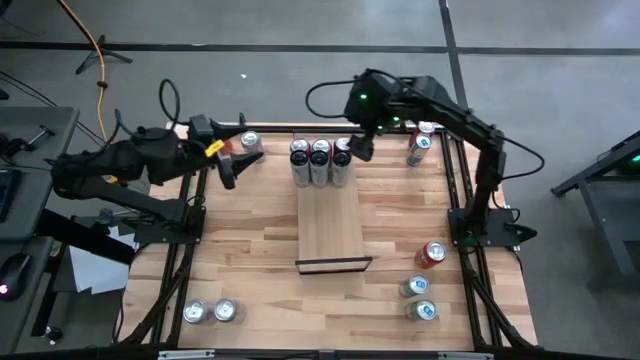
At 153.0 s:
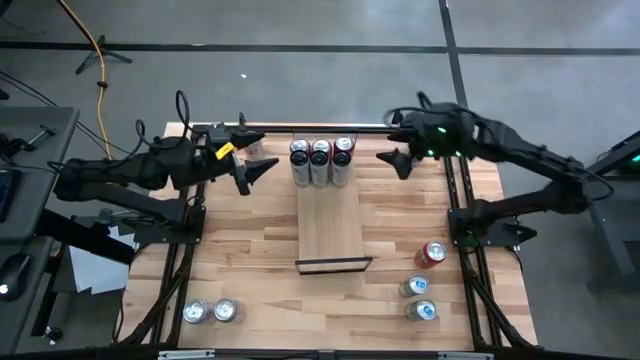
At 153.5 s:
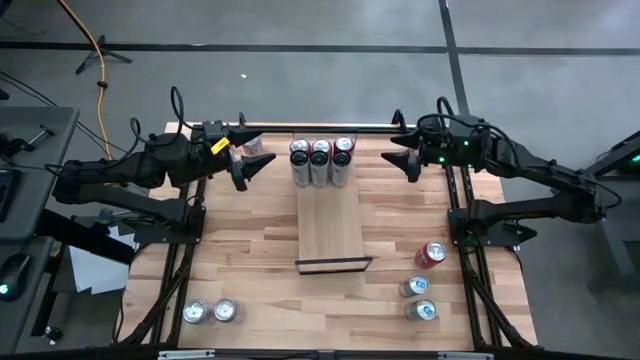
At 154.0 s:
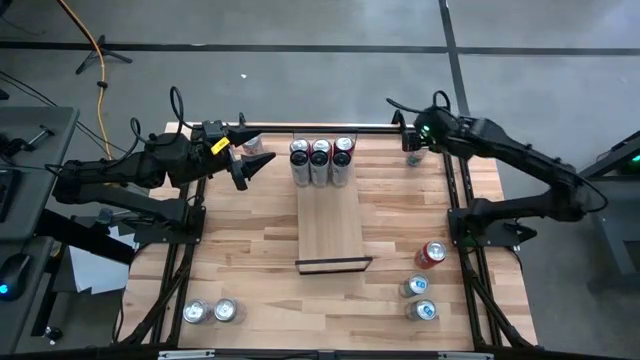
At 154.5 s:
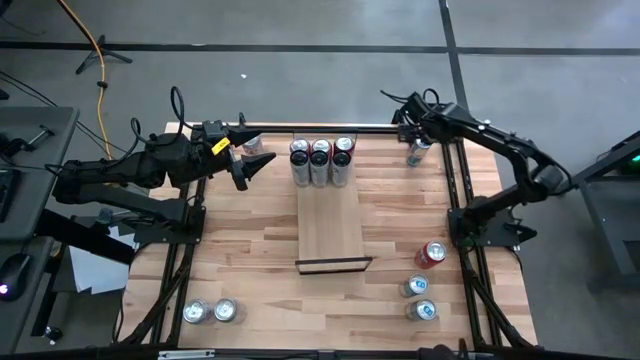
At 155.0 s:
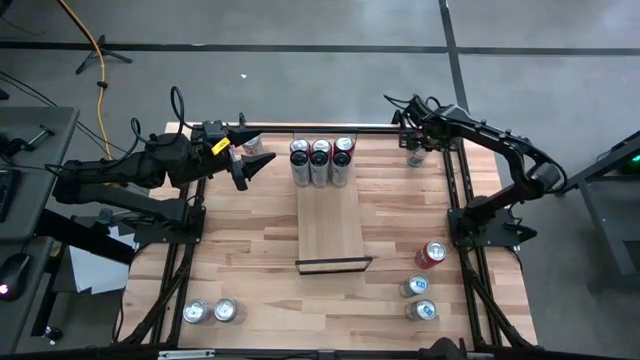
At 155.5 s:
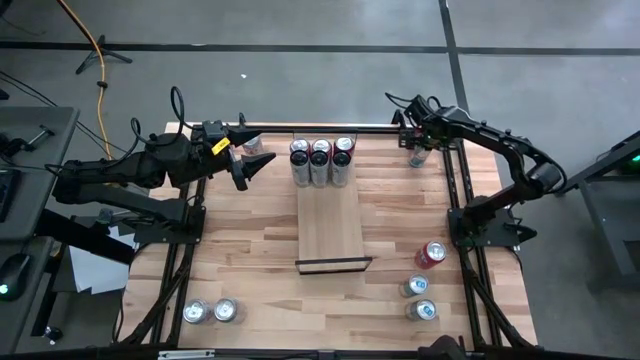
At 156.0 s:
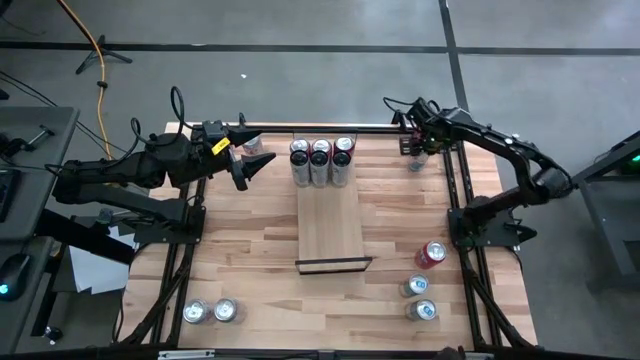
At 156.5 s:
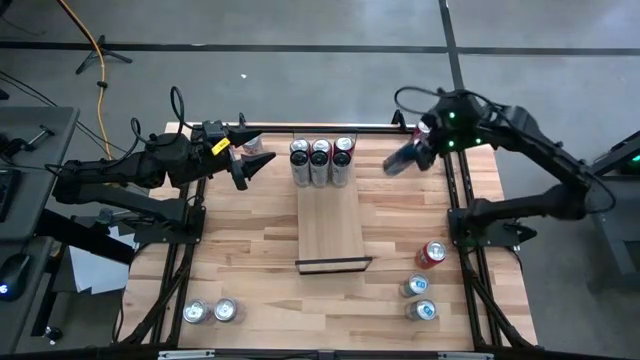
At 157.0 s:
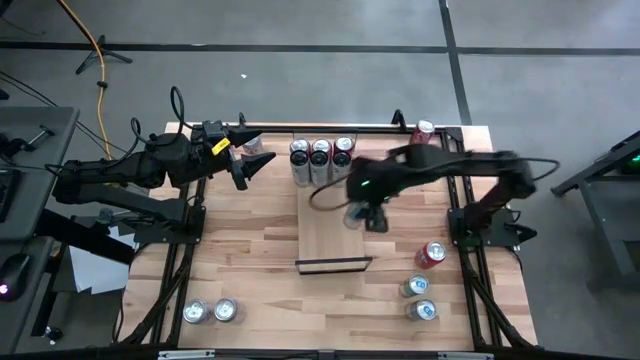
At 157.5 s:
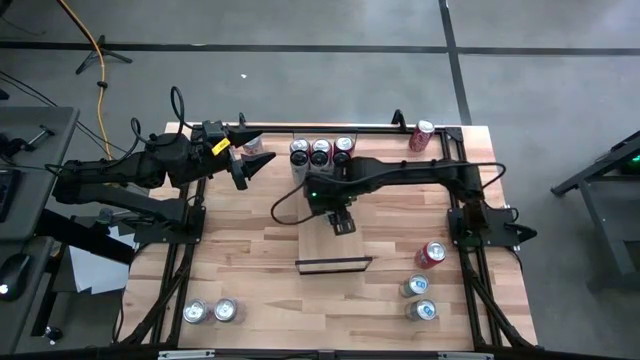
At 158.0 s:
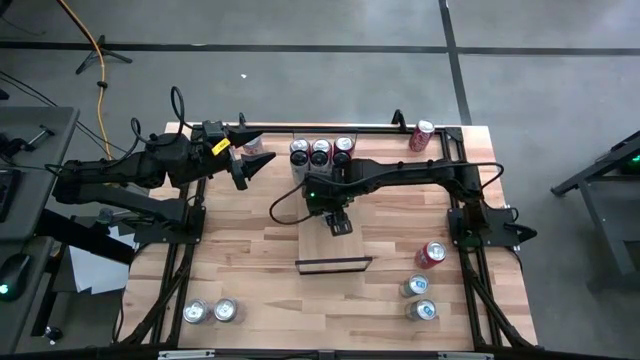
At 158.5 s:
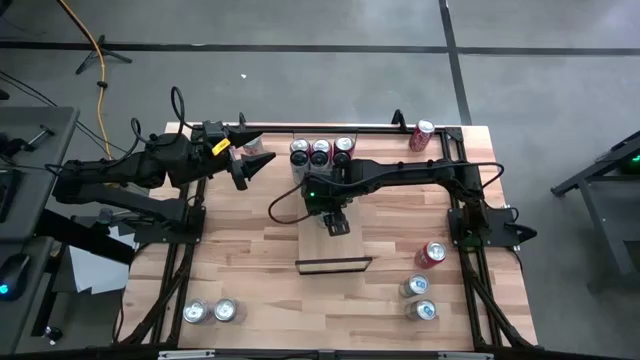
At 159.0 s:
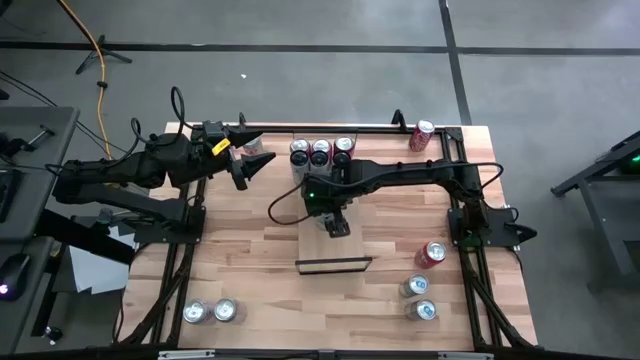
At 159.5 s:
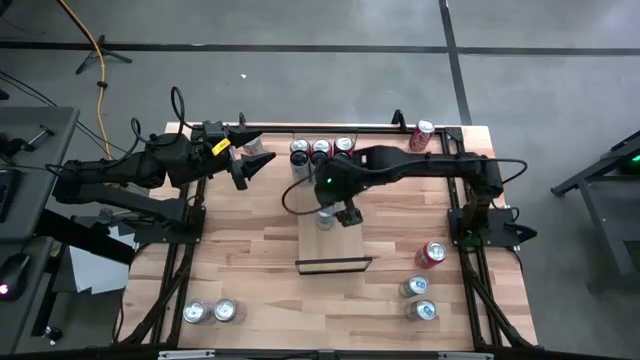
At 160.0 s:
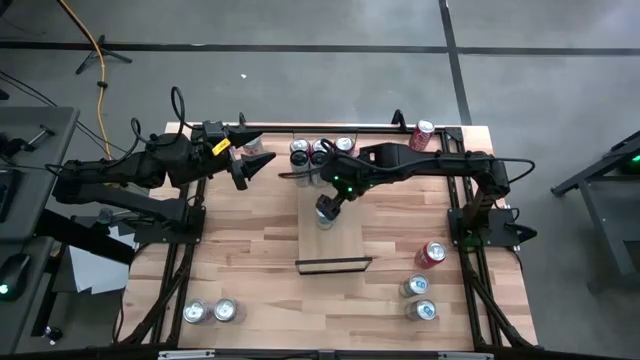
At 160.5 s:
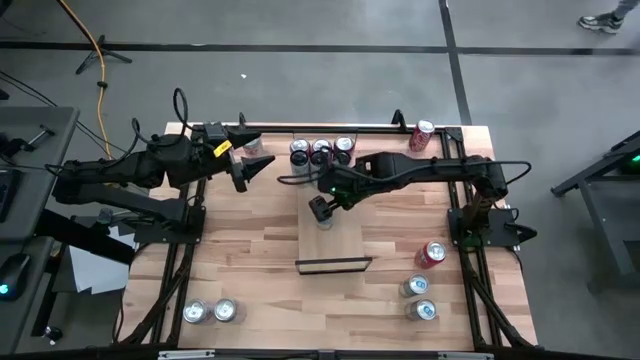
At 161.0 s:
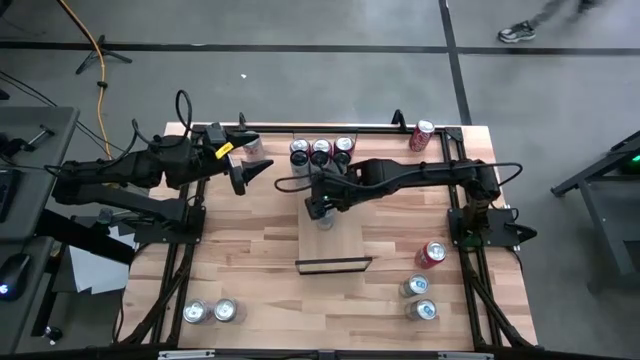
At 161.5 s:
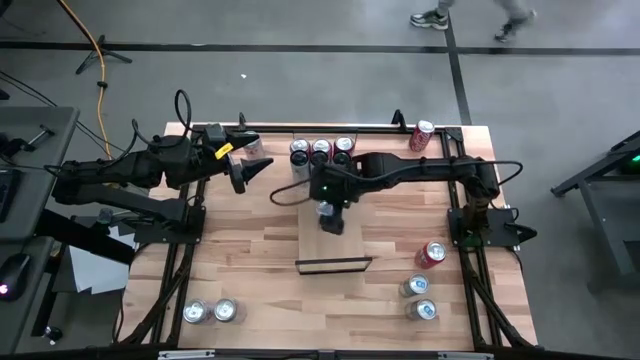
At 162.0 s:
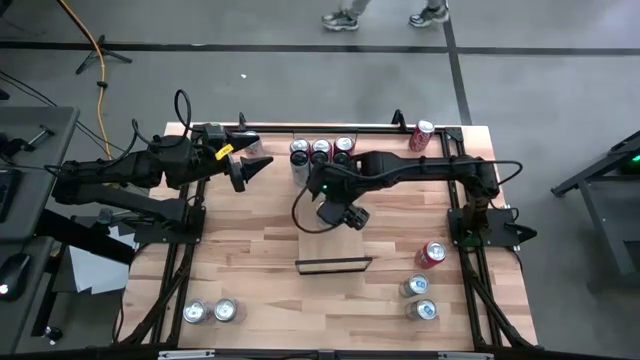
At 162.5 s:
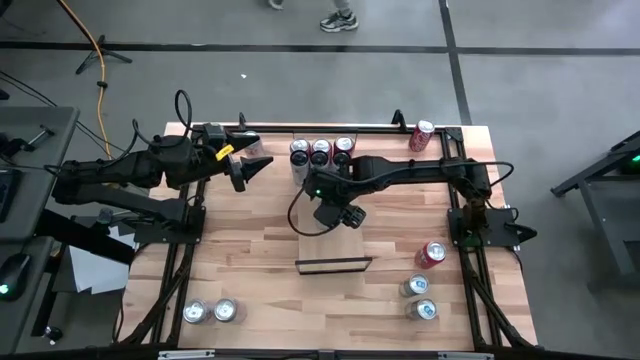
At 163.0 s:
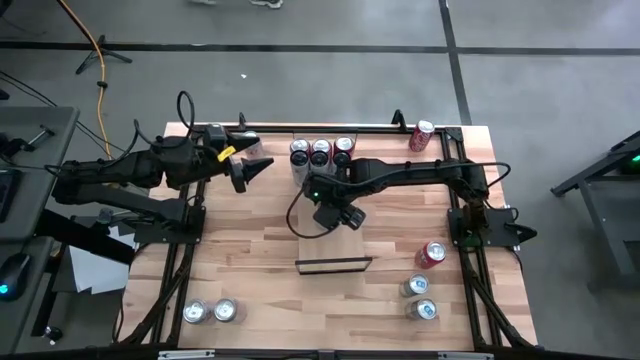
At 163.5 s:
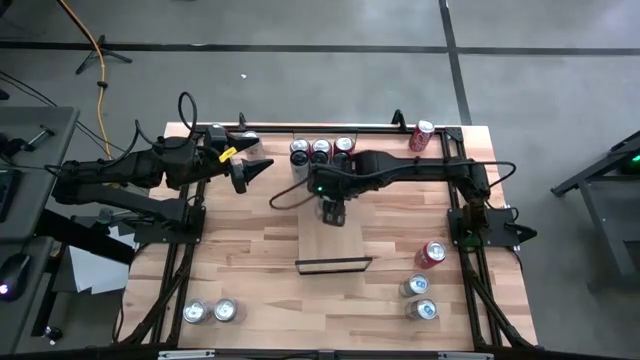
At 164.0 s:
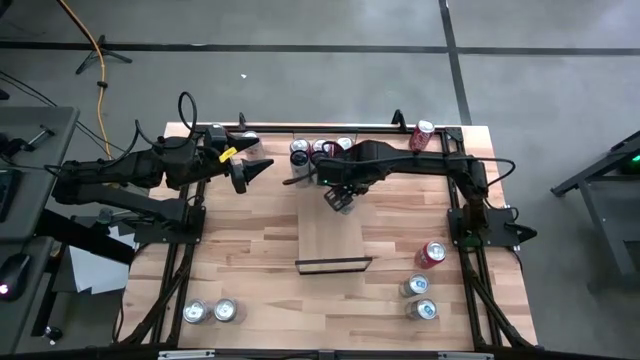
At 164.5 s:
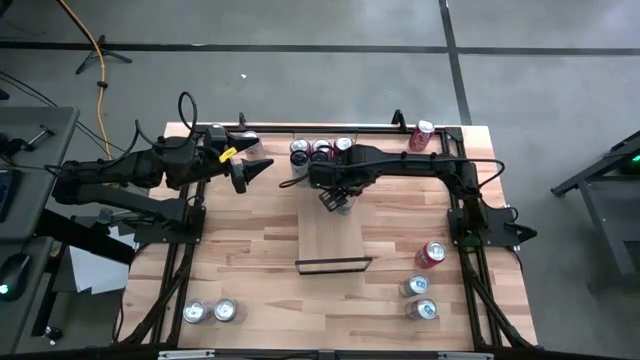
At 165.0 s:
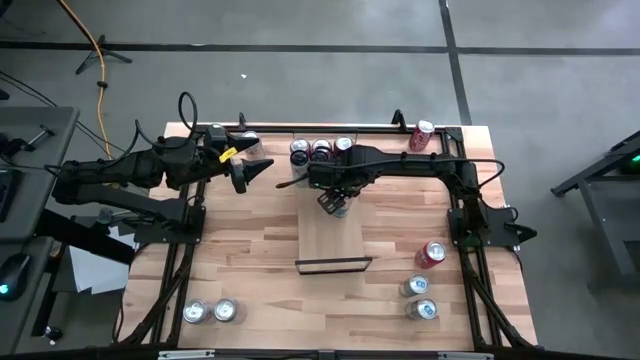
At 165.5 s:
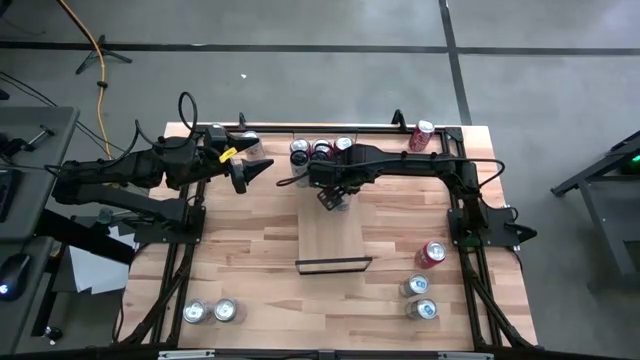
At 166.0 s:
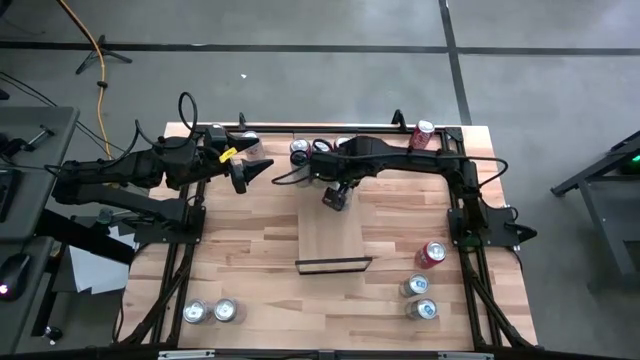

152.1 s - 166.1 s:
Task: Place canned beverage on shelf
Put the blue soda can on the shelf

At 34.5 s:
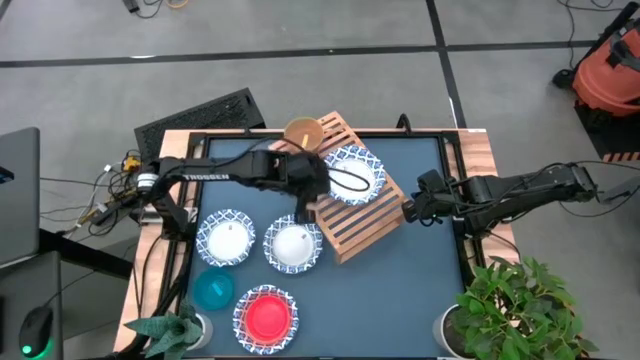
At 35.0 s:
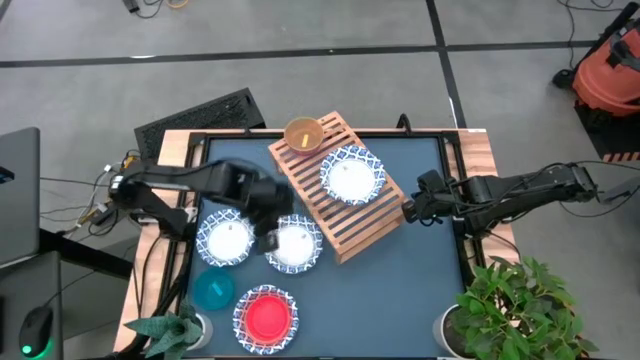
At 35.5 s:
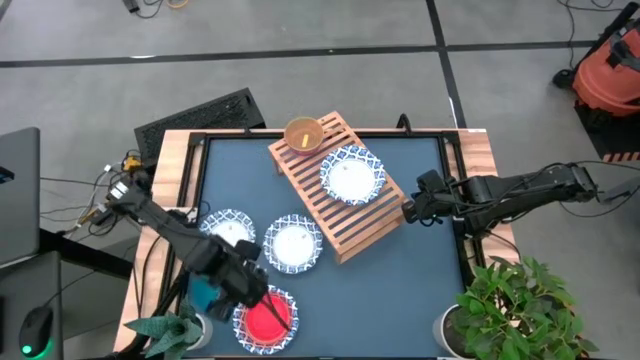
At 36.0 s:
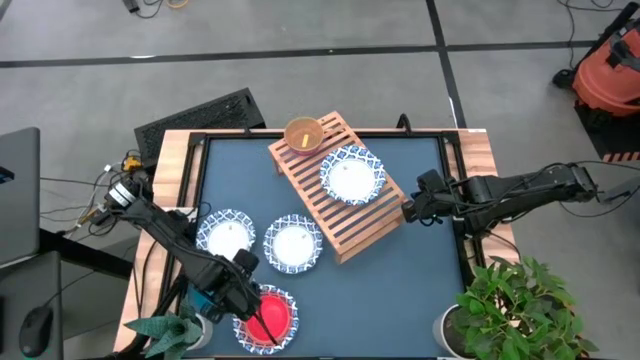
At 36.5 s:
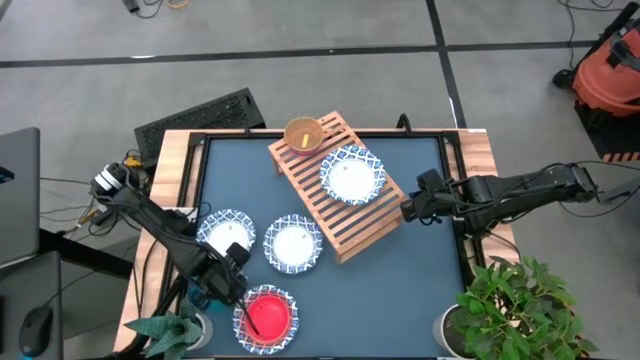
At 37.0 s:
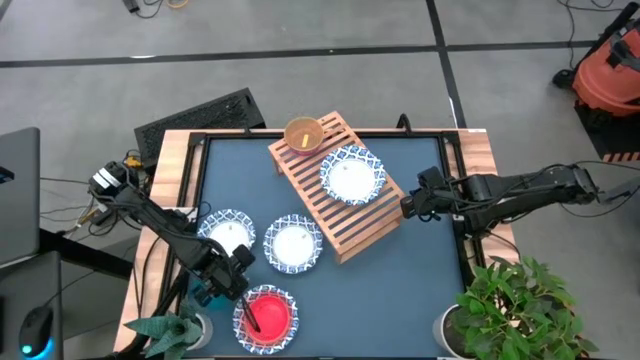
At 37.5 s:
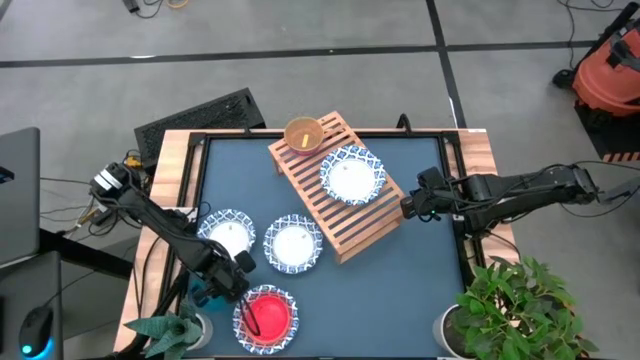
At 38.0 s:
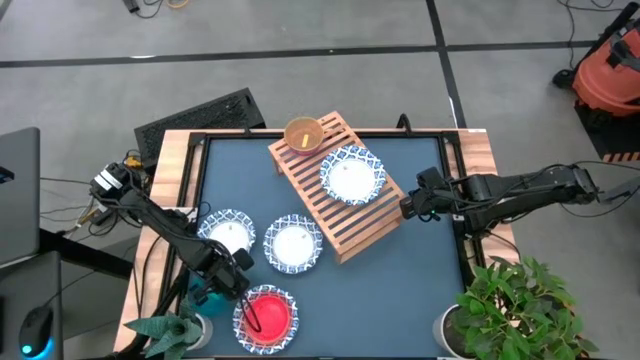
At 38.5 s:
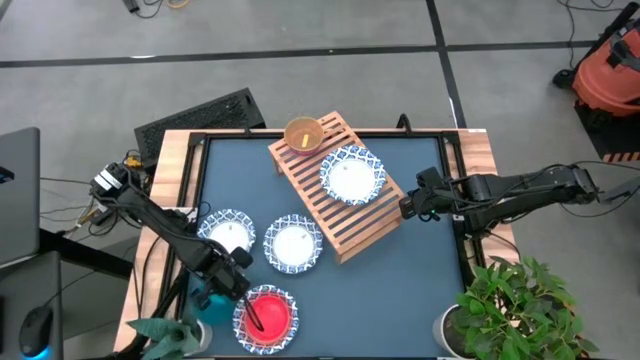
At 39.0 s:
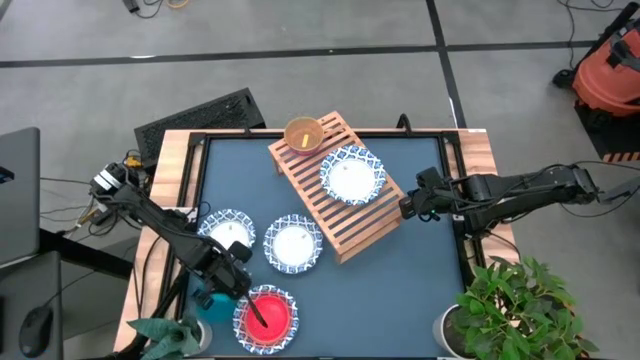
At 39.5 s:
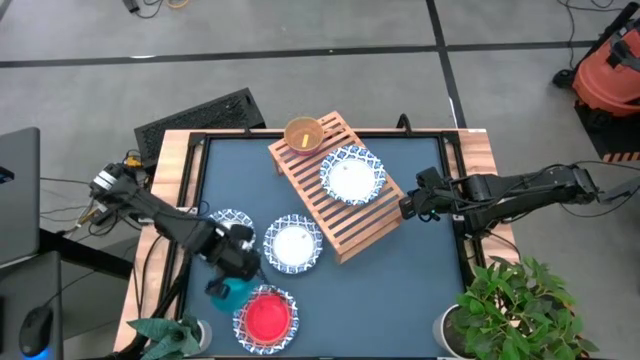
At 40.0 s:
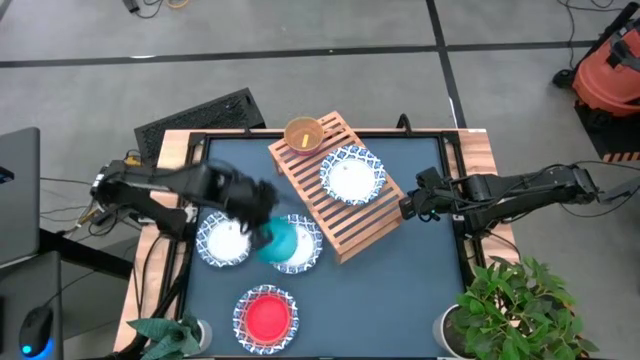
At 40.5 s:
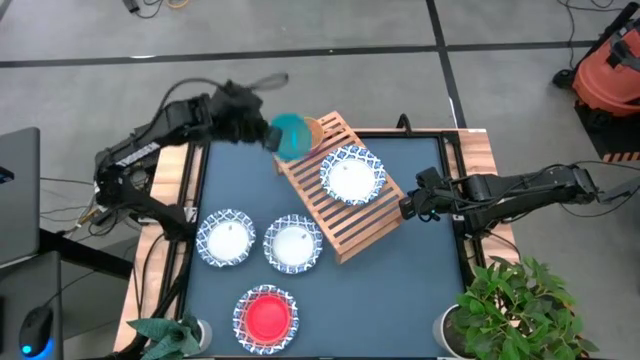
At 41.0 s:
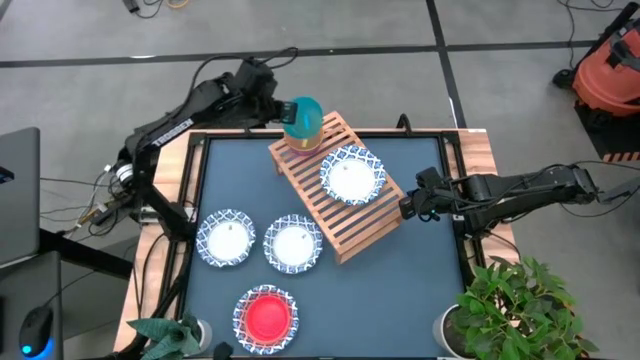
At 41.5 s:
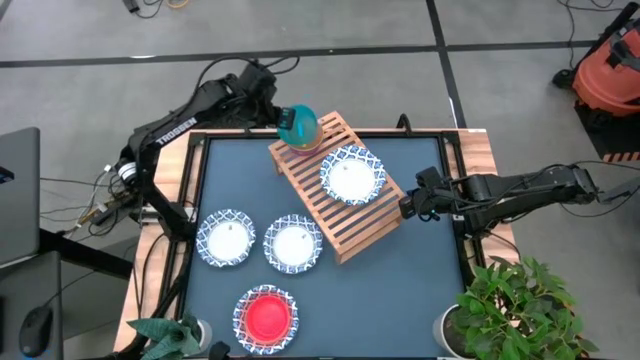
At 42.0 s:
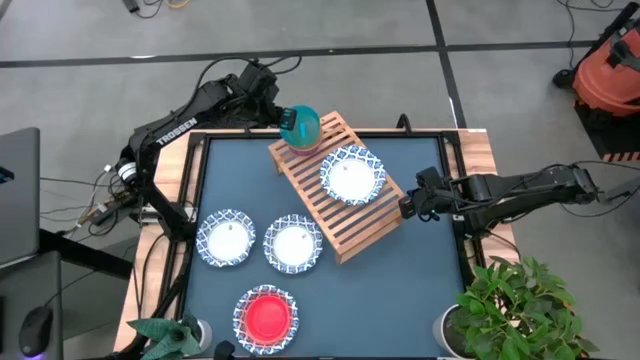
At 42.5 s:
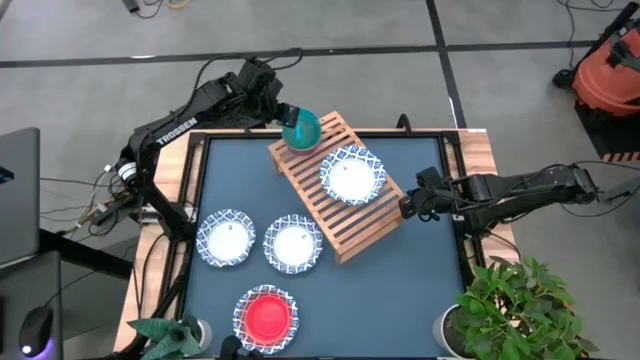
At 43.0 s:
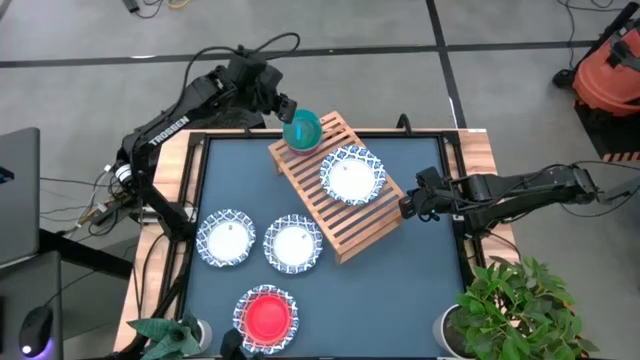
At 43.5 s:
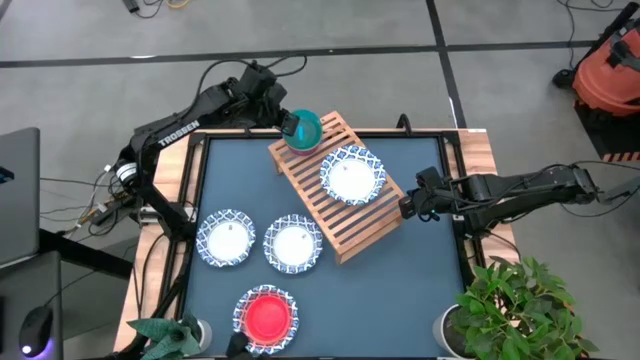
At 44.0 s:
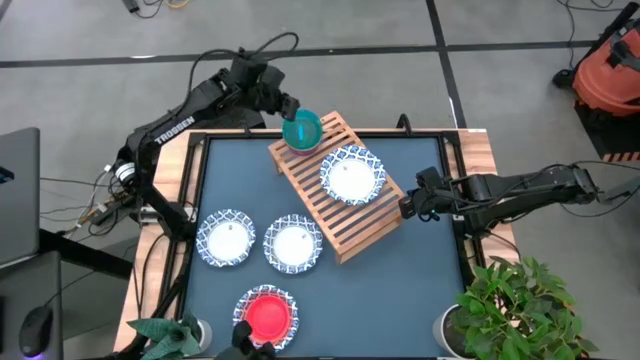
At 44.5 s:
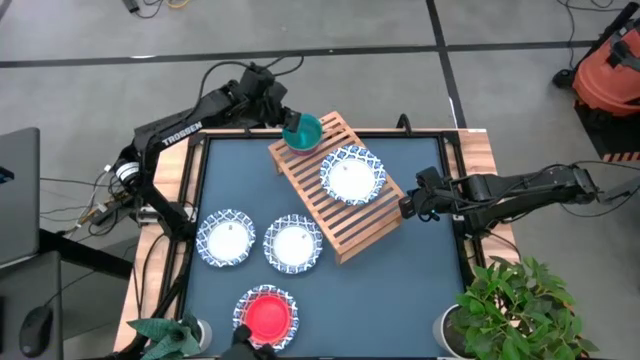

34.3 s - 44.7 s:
Task: Place and stack bowls onto a shelf
Stack the blue bowl on top of the yellow bowl on the shelf
